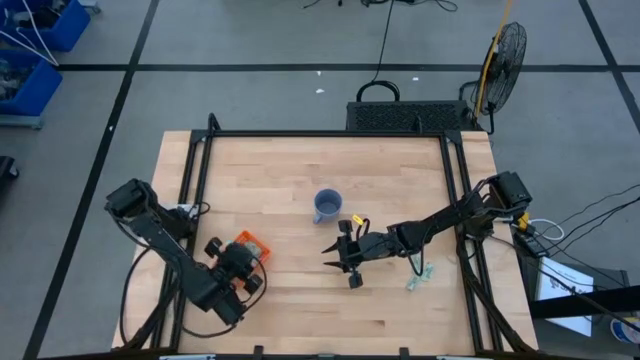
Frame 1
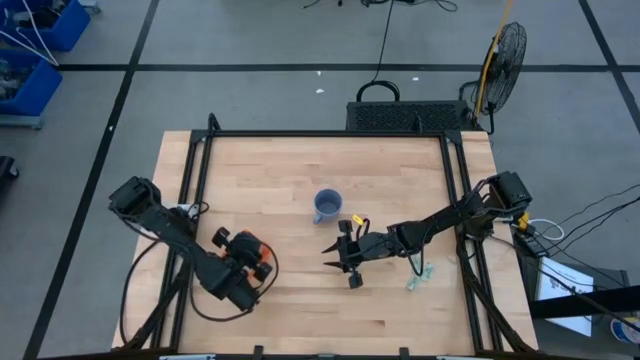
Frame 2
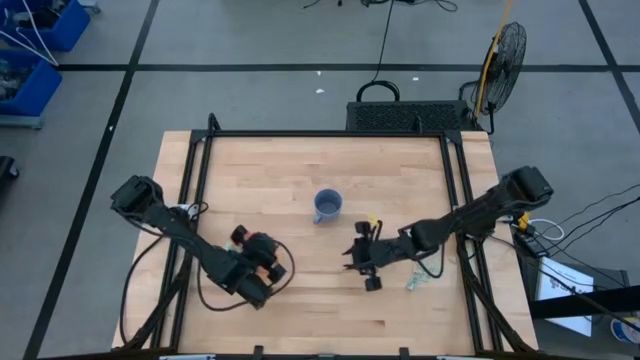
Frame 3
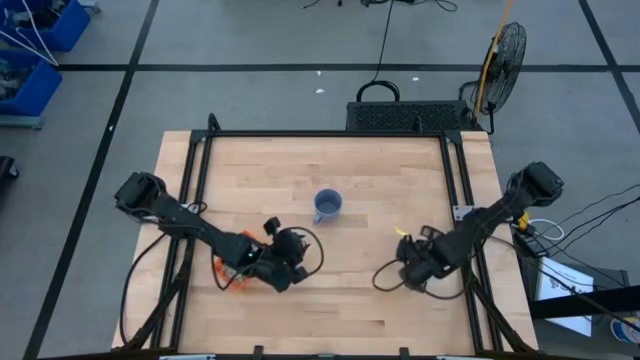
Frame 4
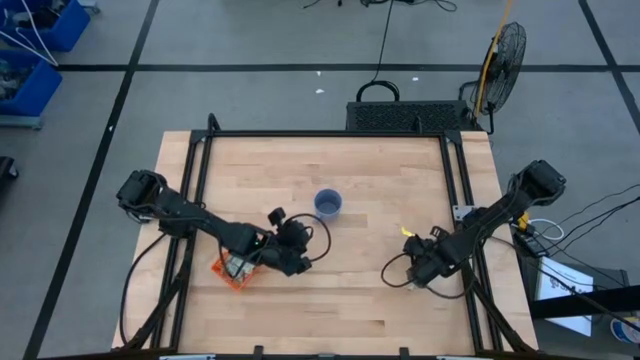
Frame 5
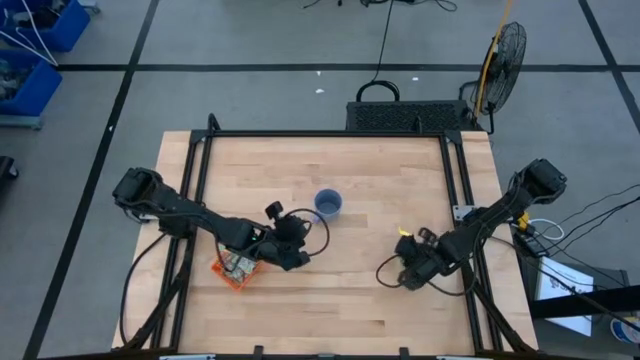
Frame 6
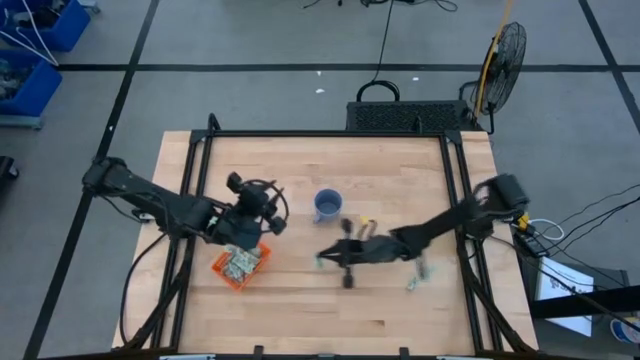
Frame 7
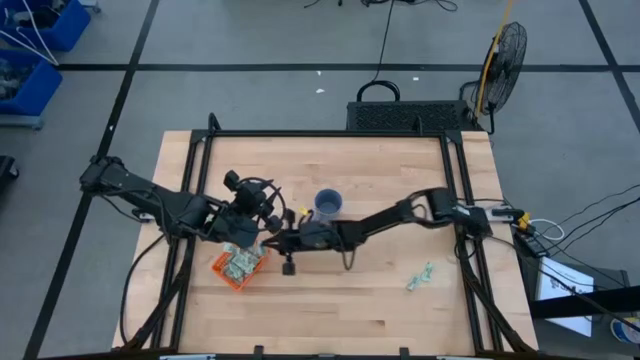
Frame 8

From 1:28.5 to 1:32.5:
Task: Pick and place Stevia / Truvia into bins
Put the green stevia packet into the orange basket

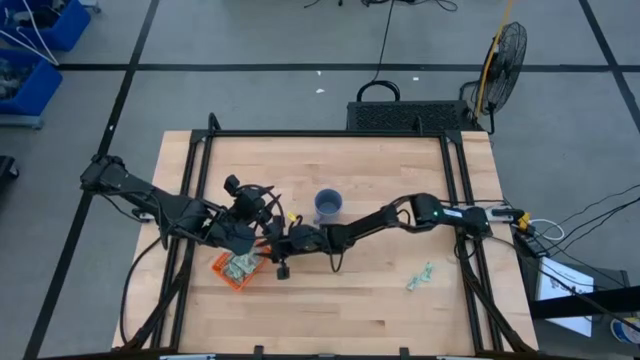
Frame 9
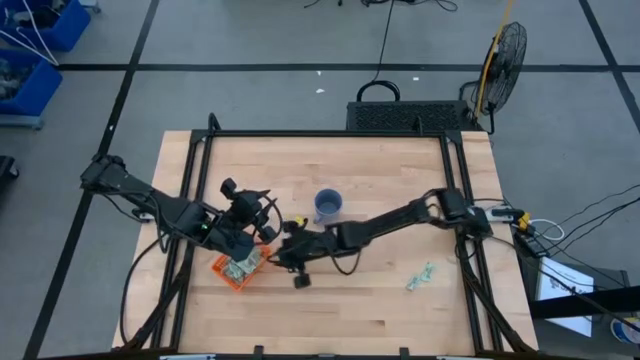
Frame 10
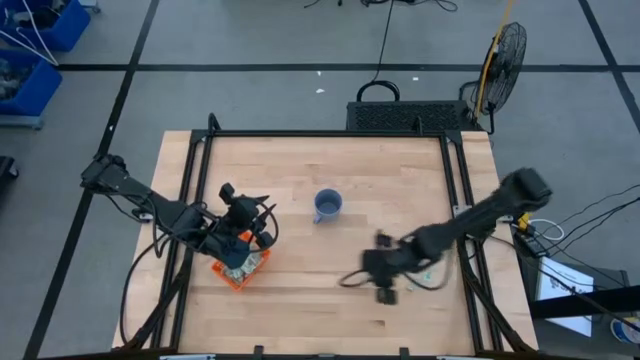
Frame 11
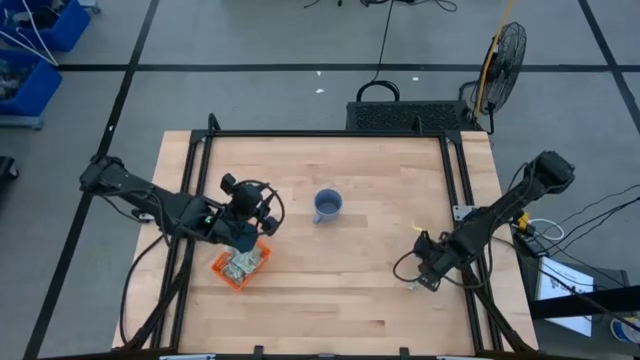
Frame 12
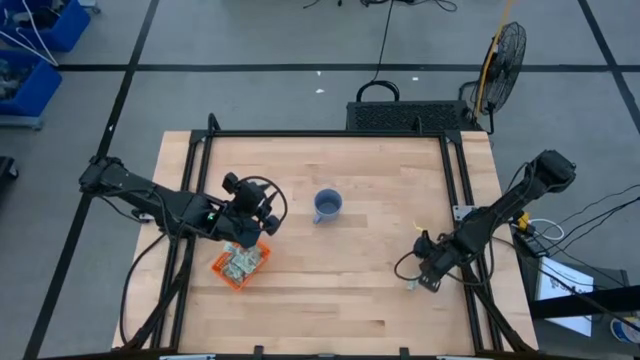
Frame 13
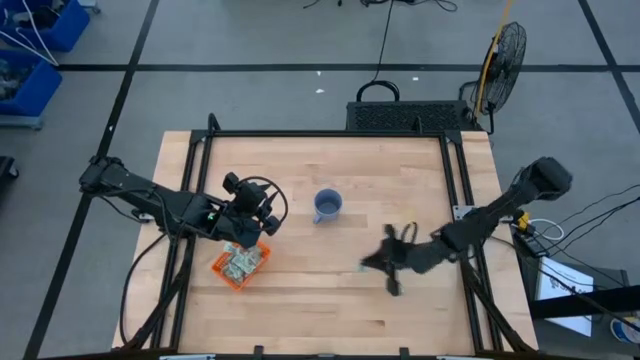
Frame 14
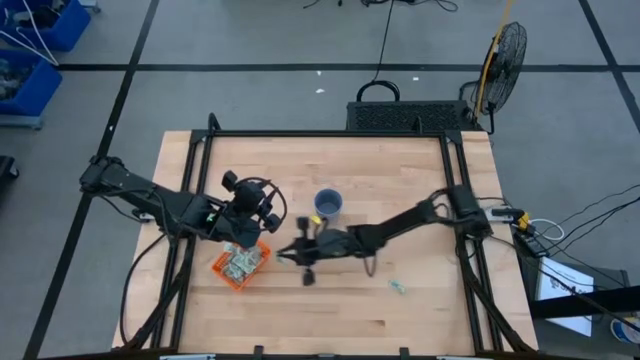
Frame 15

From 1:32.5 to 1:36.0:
Put the green stevia packet into the orange basket

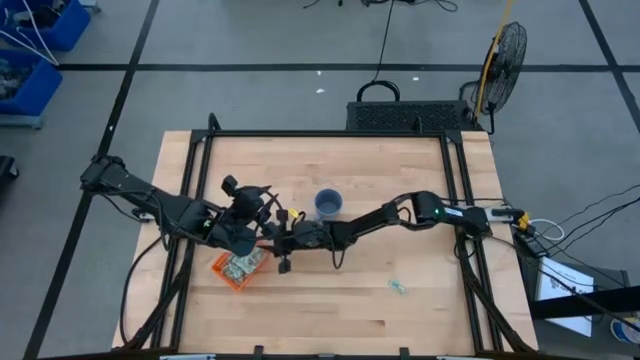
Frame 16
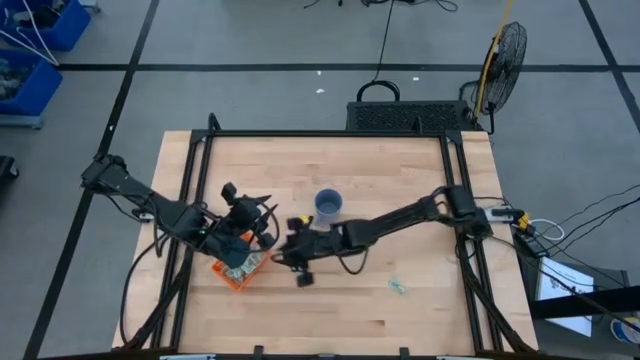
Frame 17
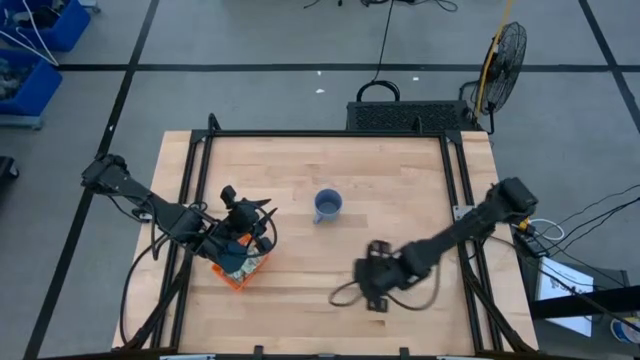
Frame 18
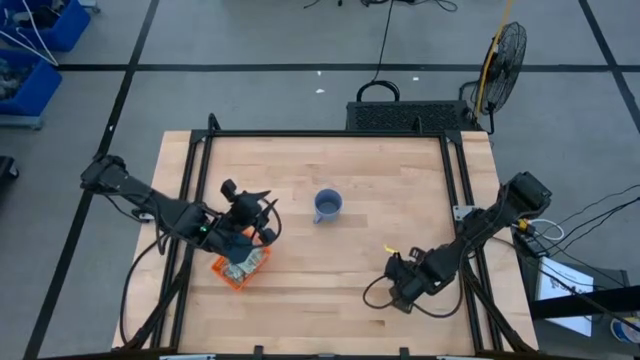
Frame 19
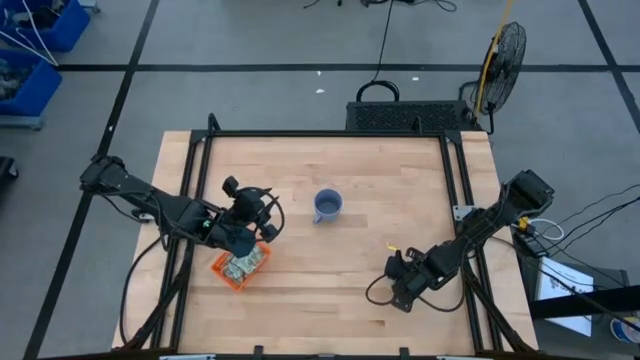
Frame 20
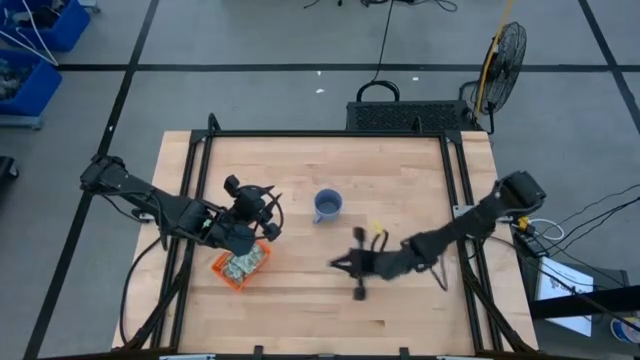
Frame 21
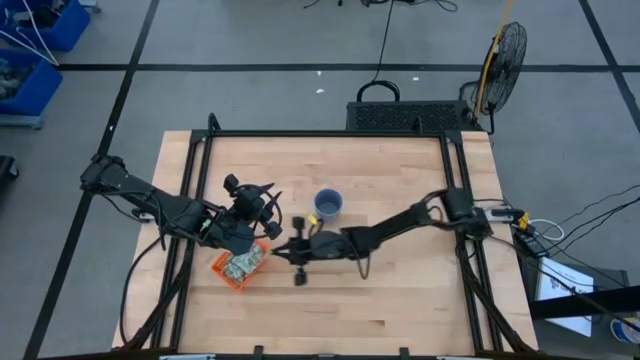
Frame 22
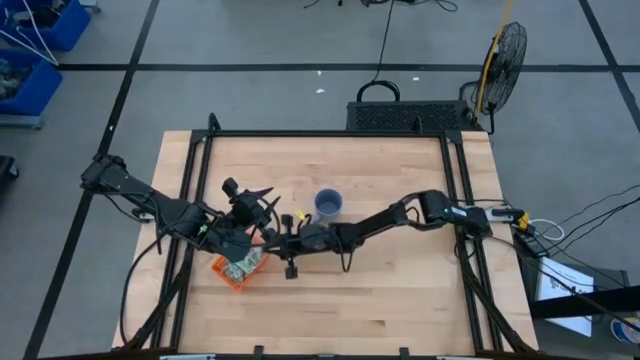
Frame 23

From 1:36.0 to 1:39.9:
Put the green stevia packet into the orange basket

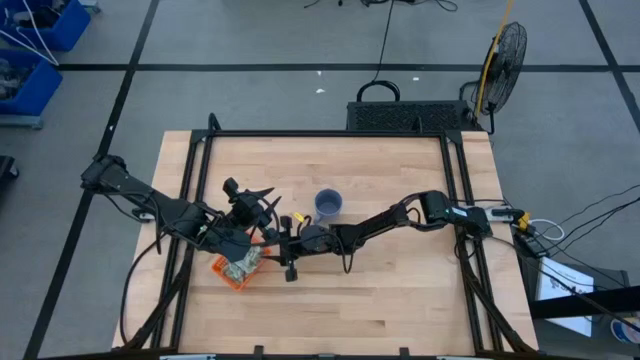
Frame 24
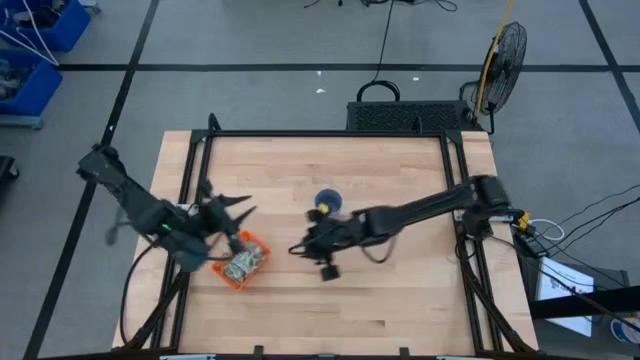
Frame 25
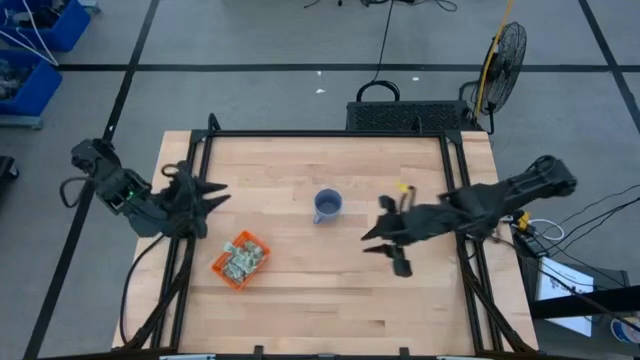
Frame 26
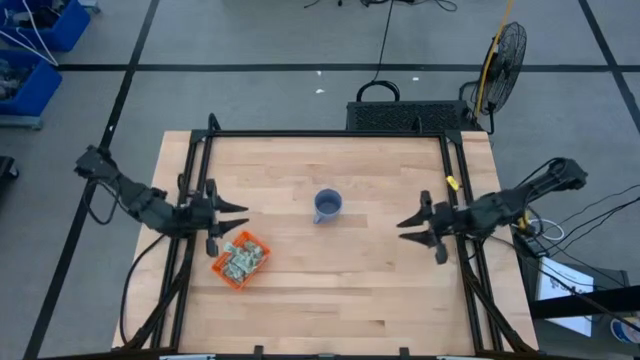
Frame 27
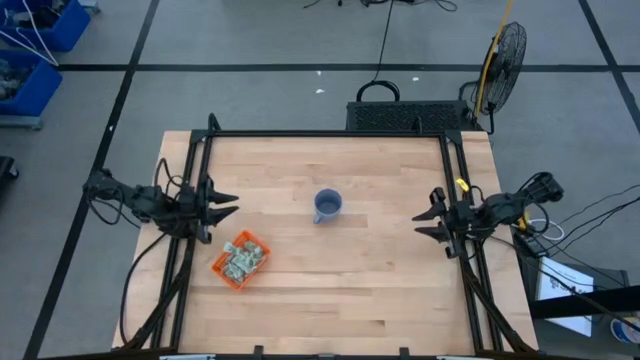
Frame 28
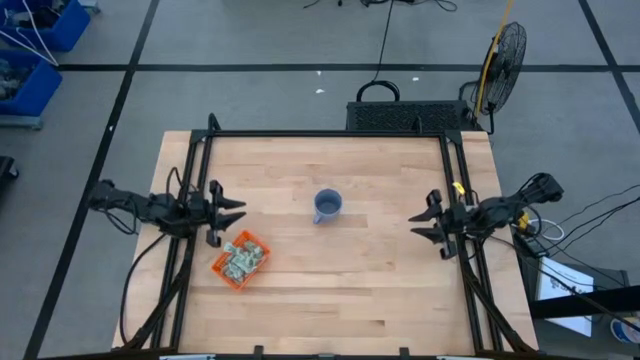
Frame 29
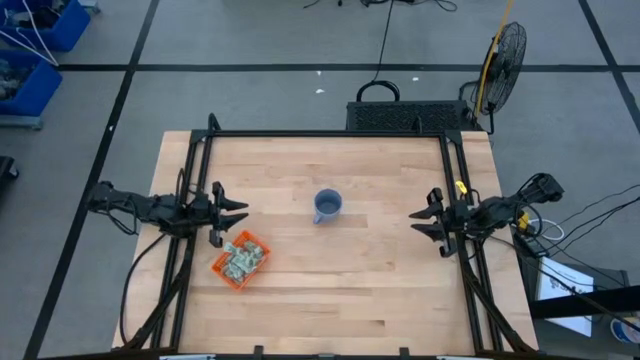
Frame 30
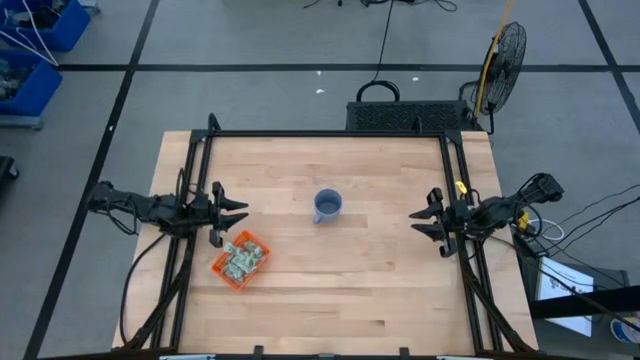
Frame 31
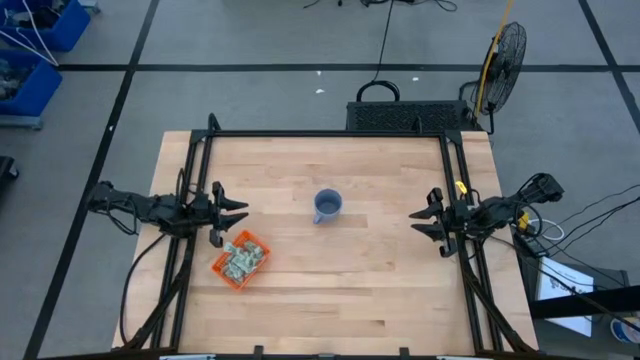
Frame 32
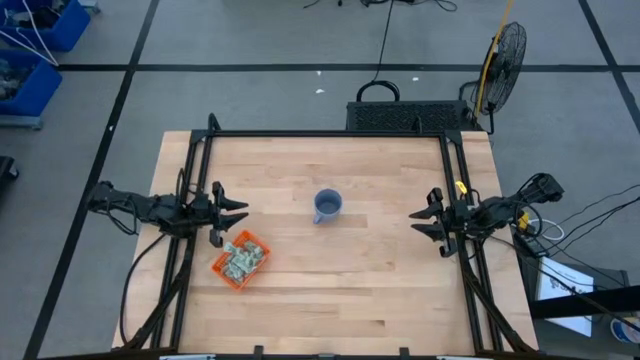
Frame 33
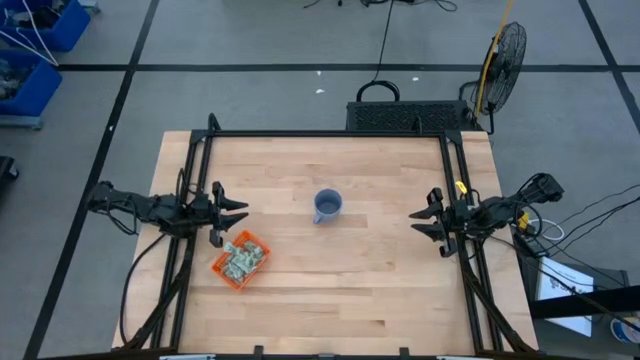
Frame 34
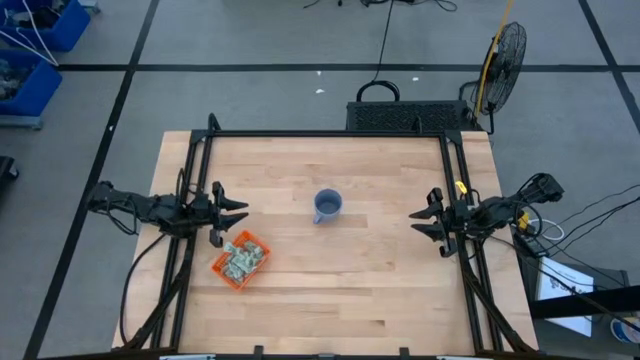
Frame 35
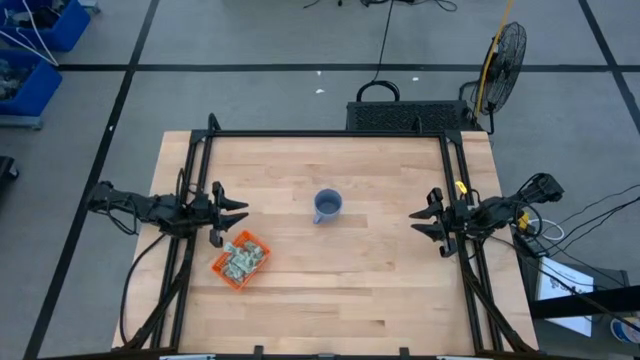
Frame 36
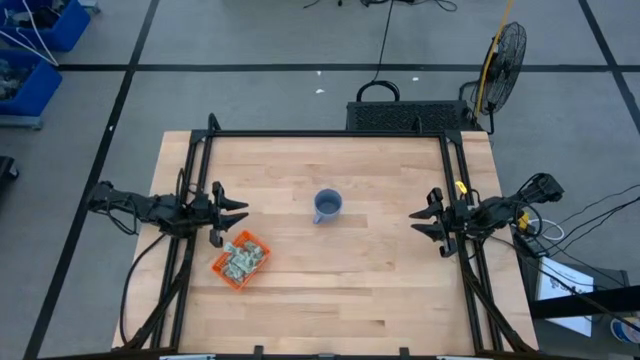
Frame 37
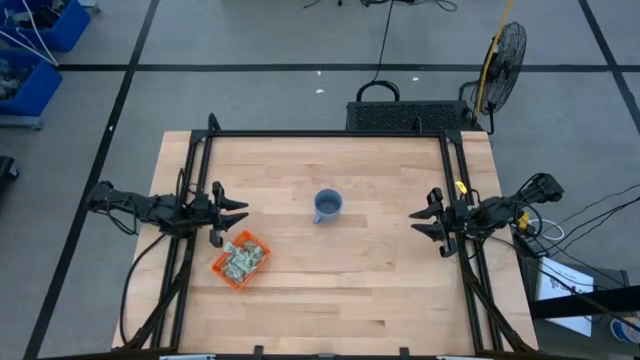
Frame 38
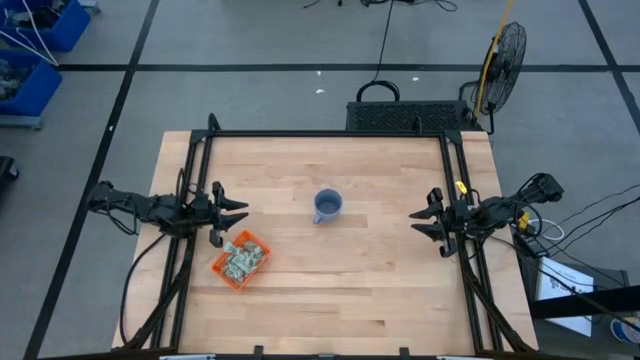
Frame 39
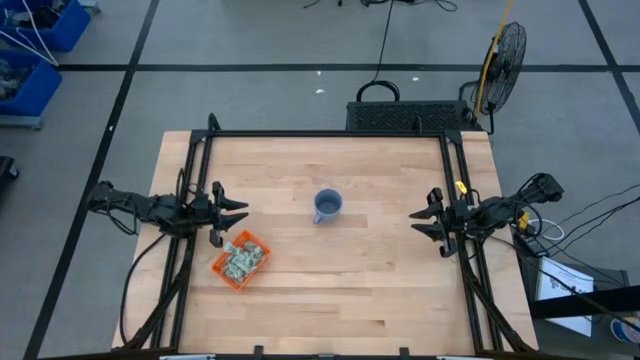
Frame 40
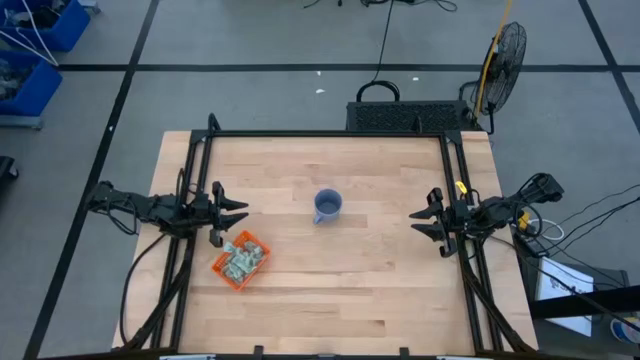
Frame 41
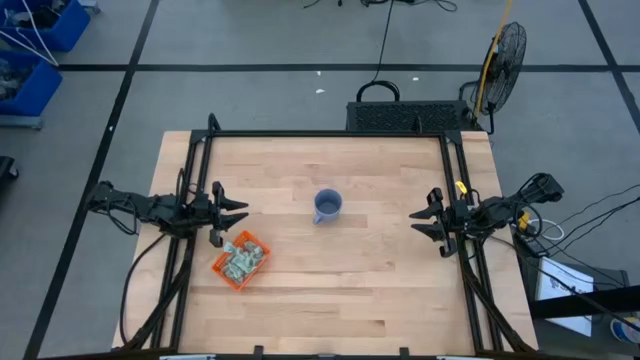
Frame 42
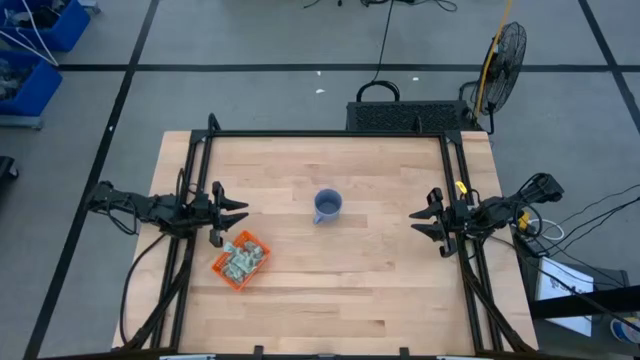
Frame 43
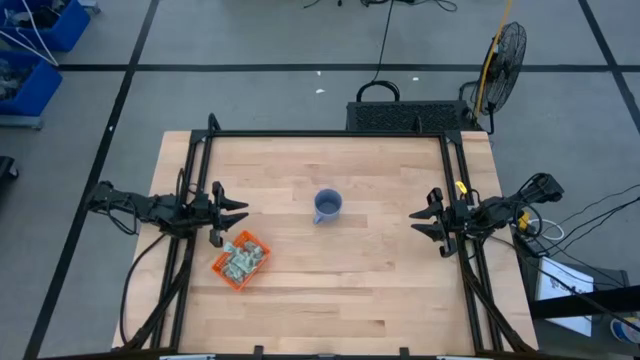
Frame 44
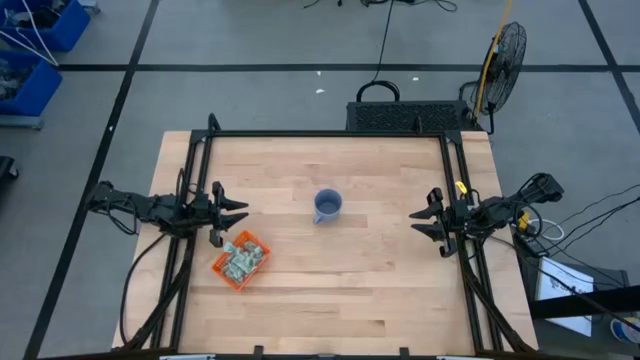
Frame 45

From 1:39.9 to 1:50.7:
Return to Home Position
